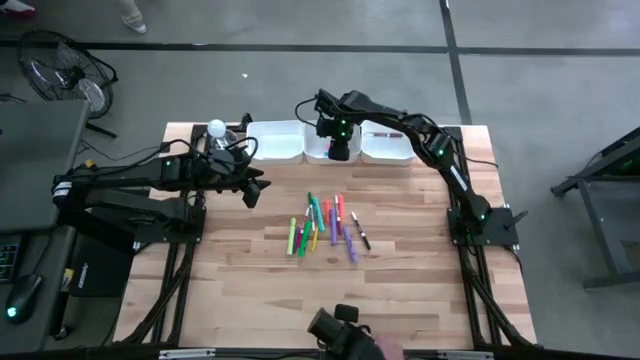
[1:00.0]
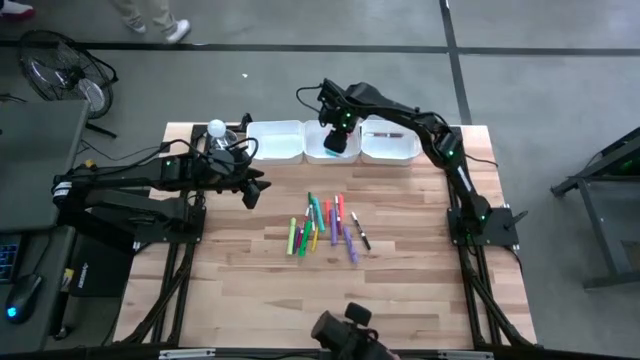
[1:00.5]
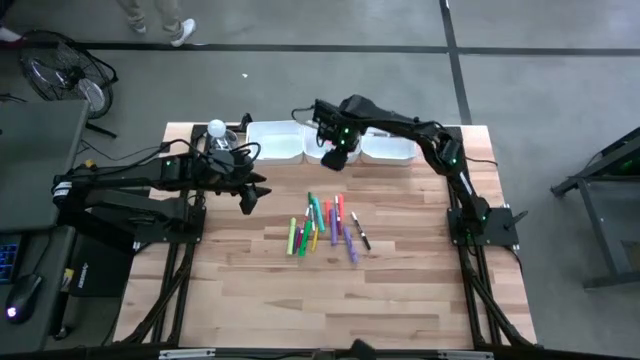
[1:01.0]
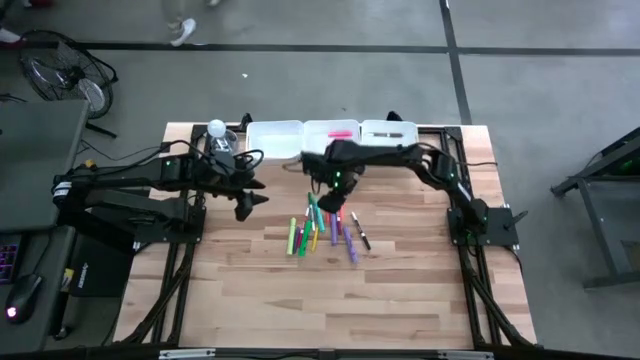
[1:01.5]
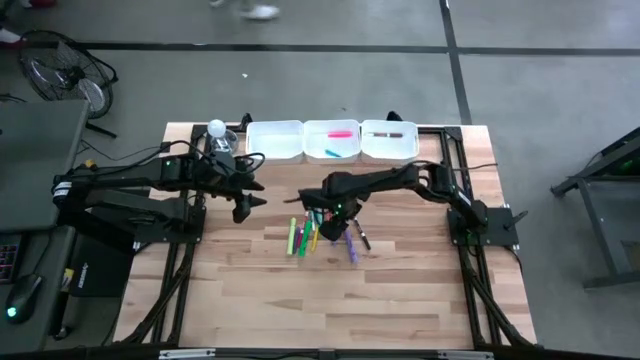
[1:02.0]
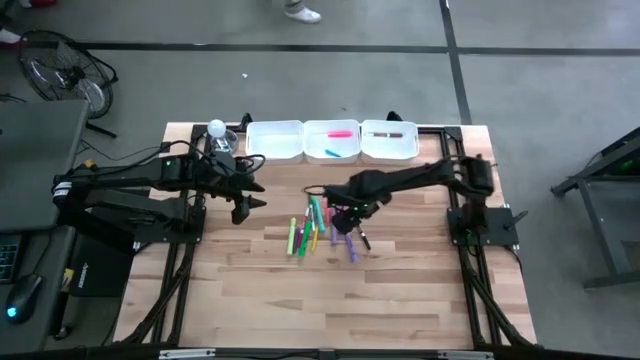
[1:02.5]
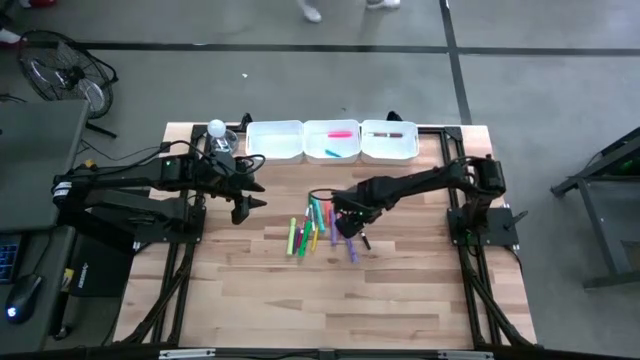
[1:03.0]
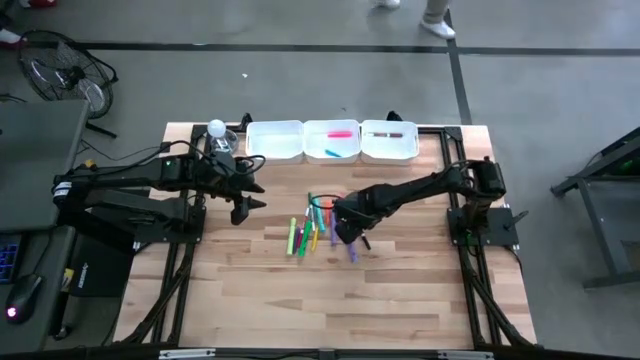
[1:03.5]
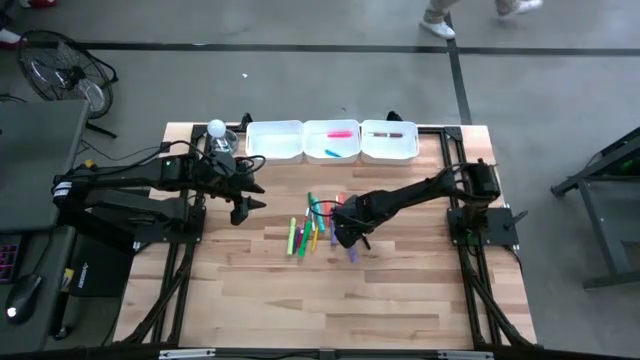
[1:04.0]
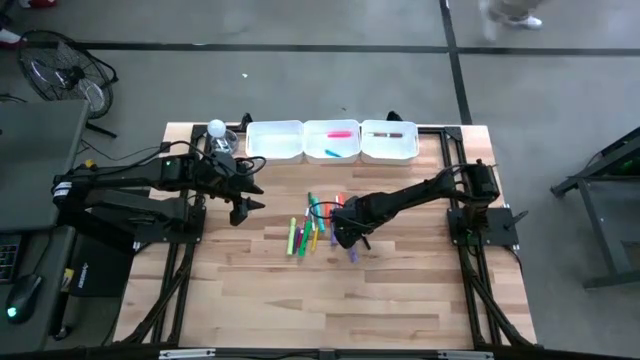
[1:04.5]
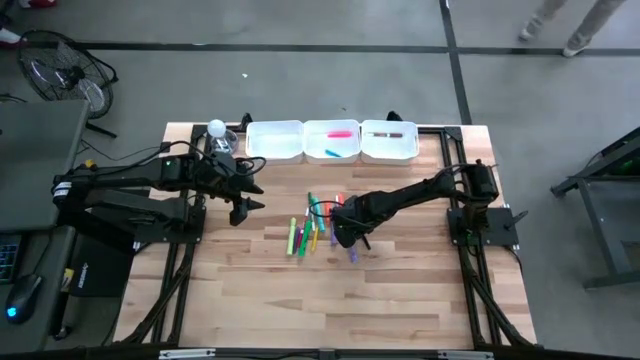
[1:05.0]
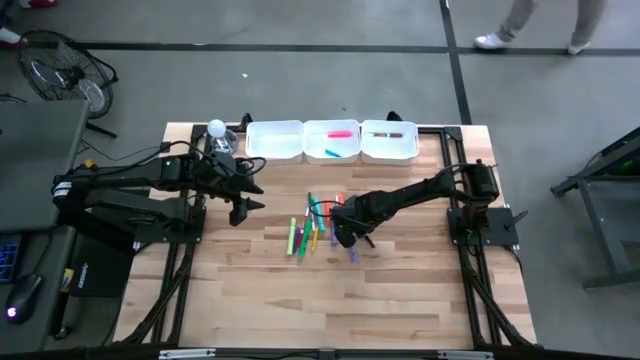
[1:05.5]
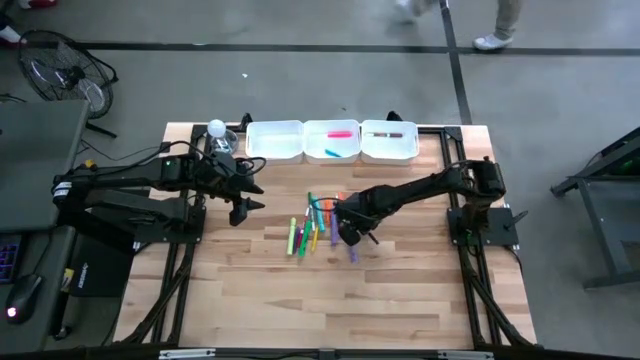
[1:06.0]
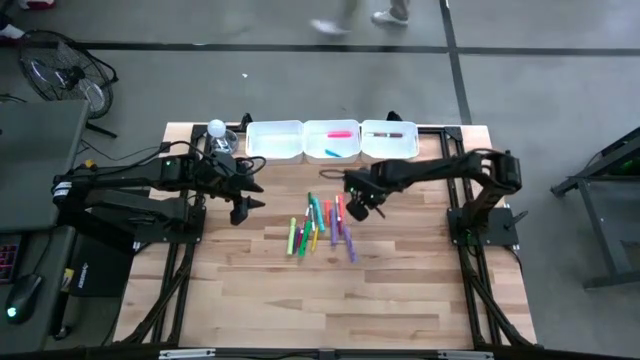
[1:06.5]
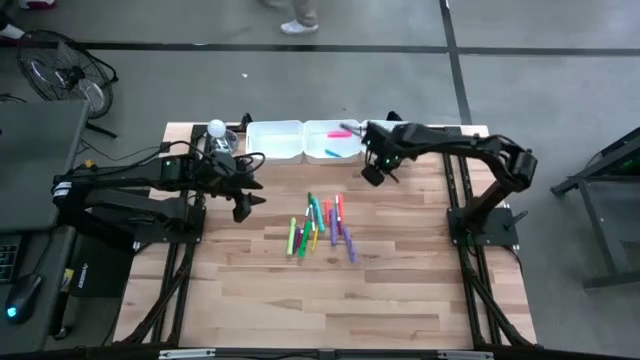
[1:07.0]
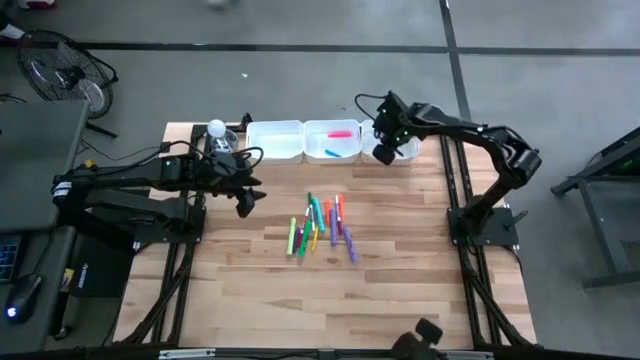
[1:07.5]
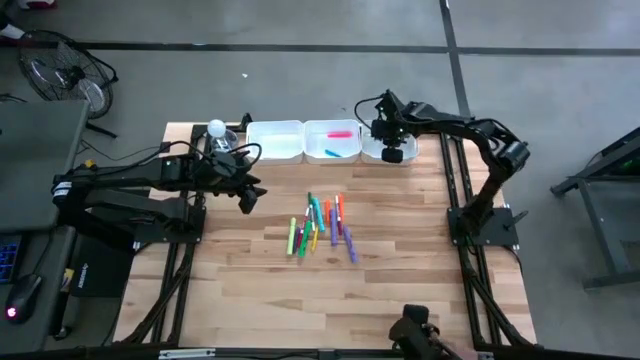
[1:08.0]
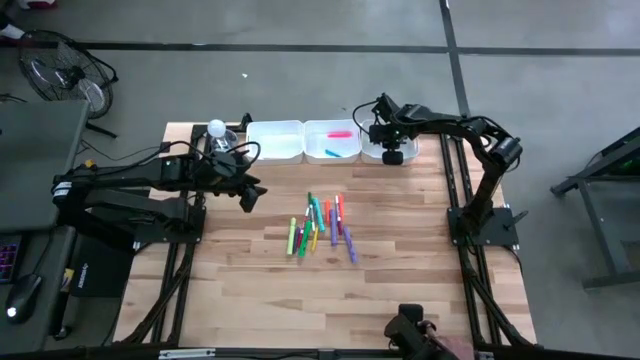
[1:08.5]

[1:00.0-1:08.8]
Task: Pick & Place Markers
Put the black marker pen into the right white bin

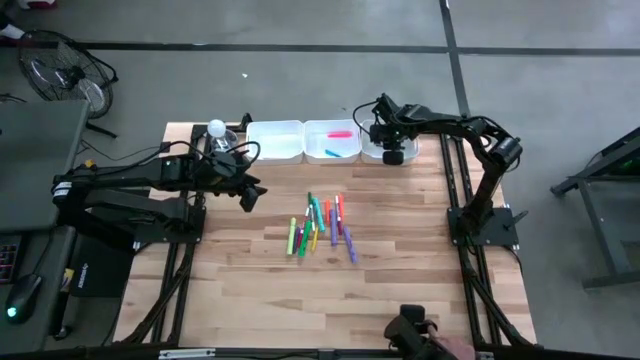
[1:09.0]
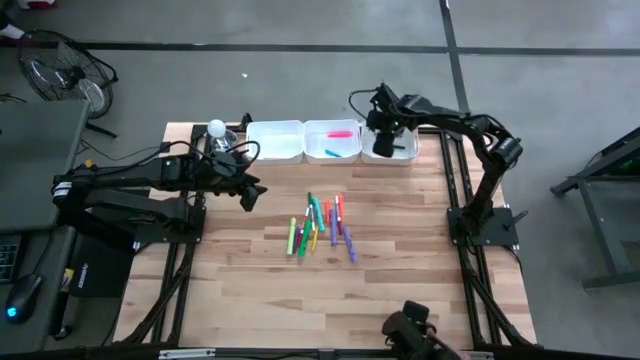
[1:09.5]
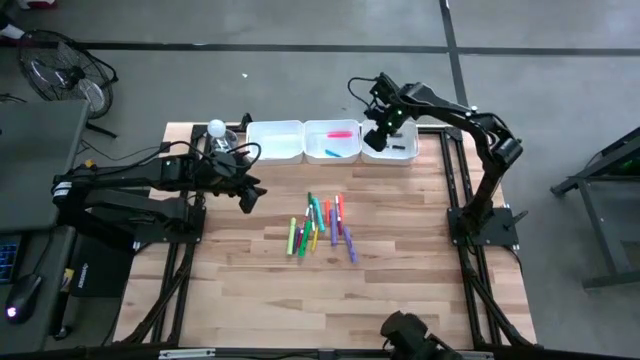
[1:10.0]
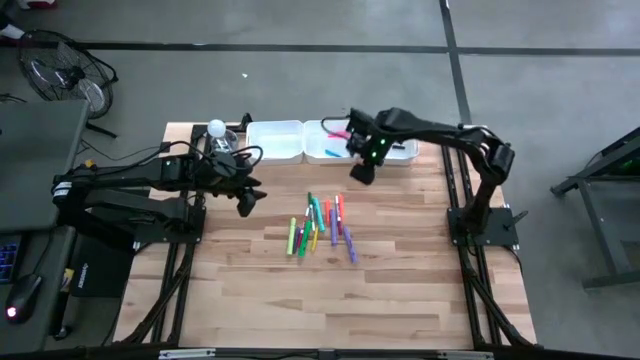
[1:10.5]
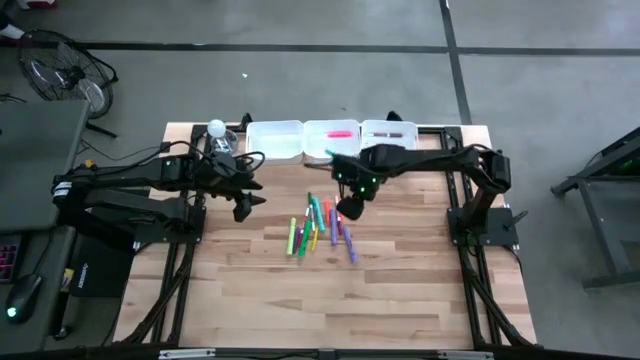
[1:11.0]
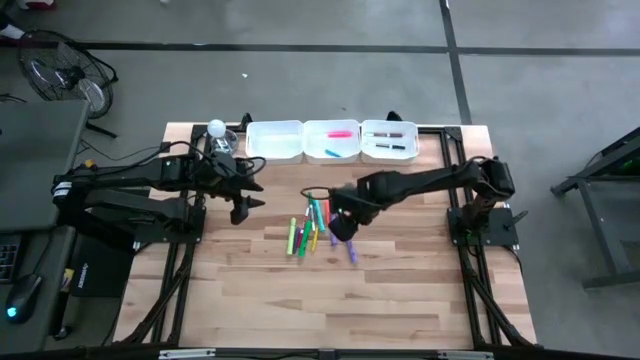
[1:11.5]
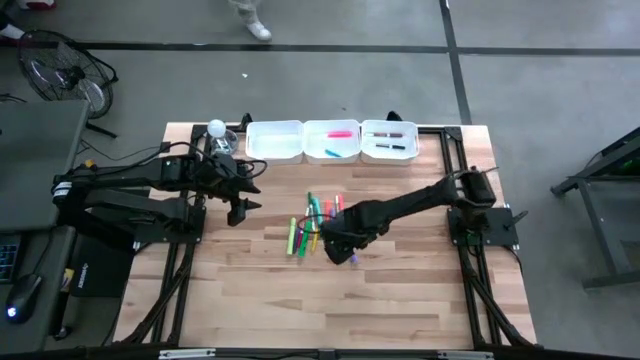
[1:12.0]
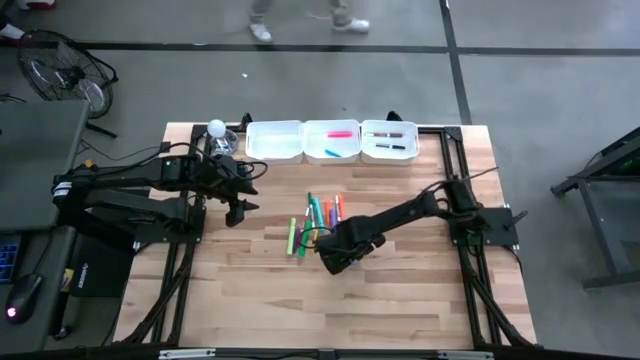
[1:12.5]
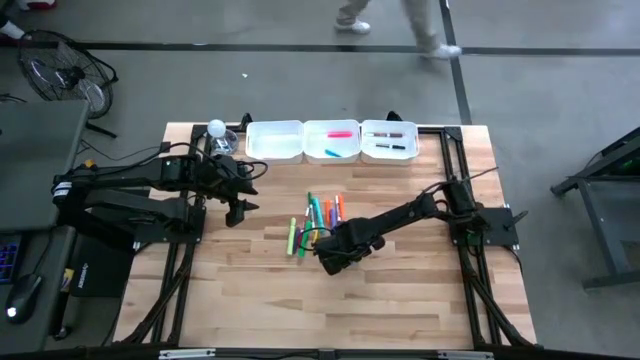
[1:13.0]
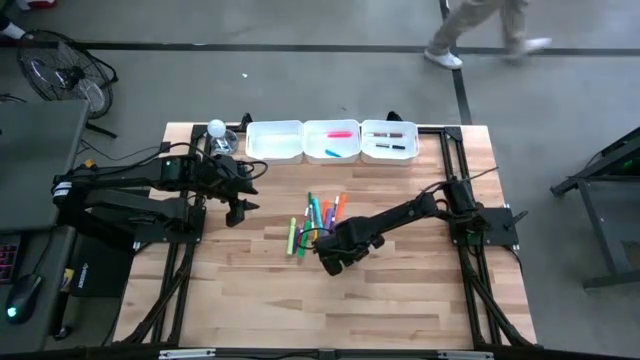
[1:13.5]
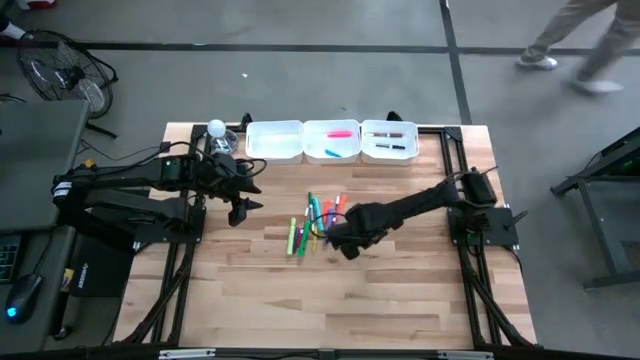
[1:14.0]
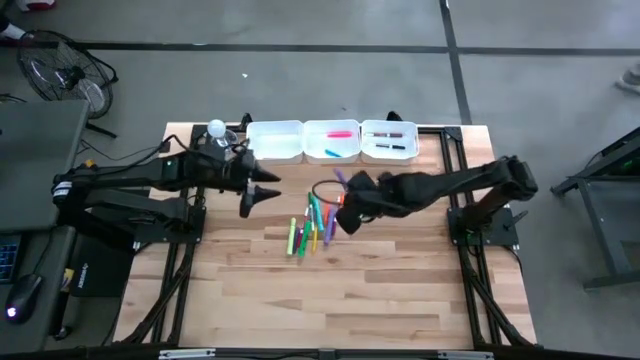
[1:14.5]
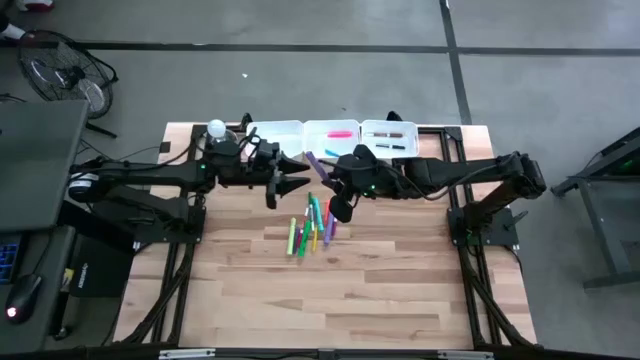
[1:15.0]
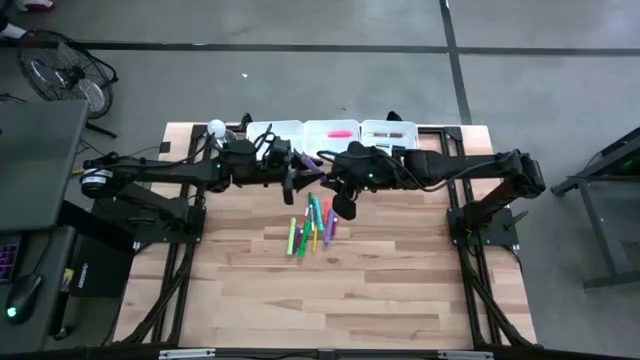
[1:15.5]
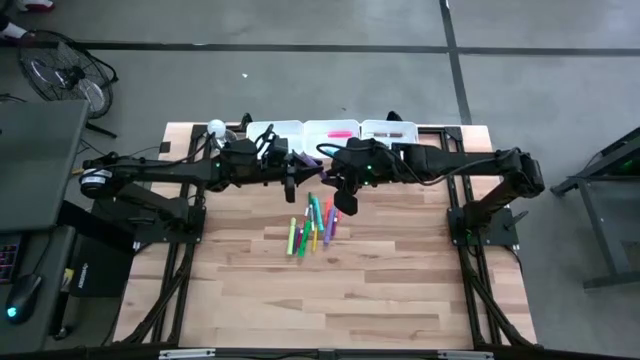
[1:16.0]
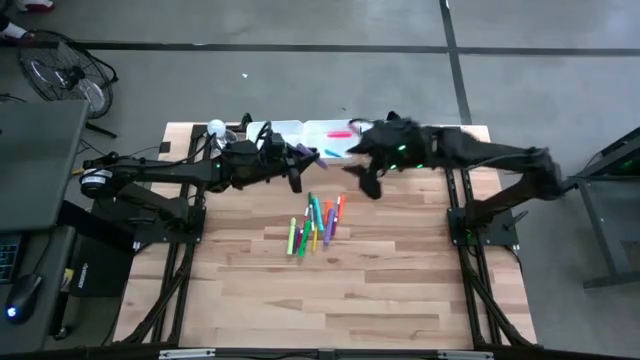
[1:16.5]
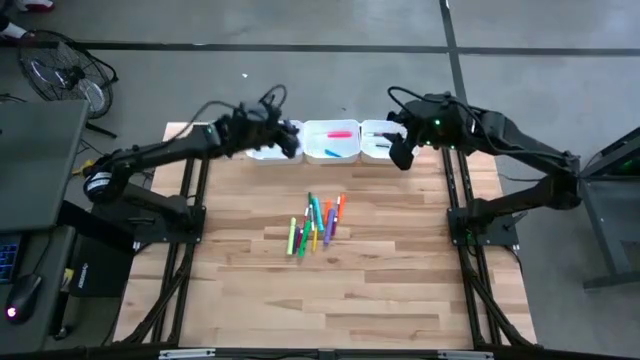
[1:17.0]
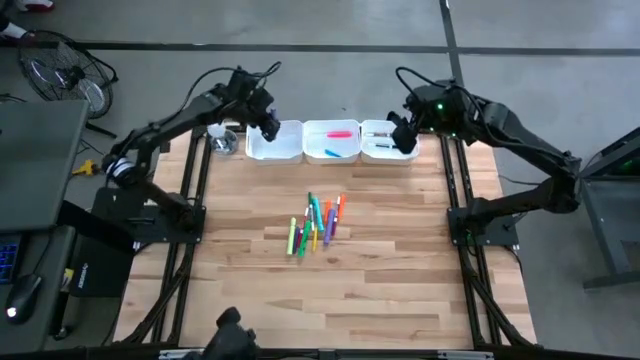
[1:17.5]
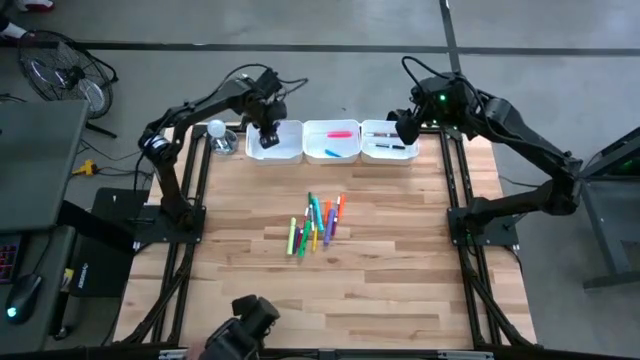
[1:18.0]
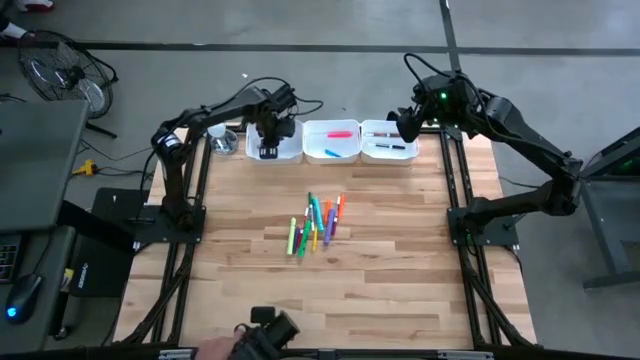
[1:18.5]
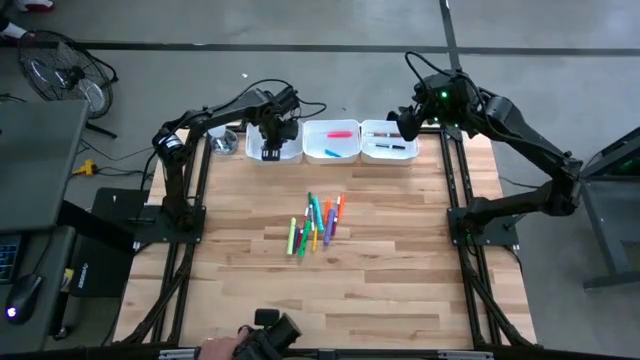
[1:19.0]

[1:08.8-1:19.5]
Put the bottom violet highlighter pen into the left white bin

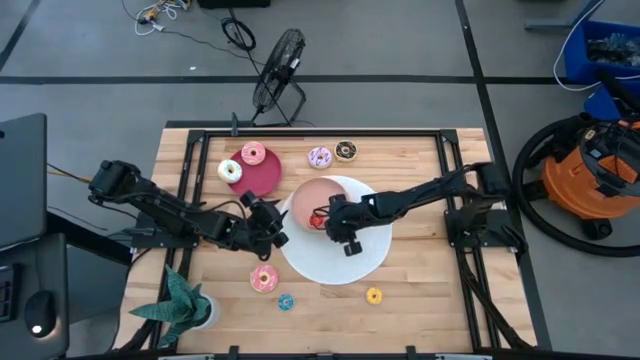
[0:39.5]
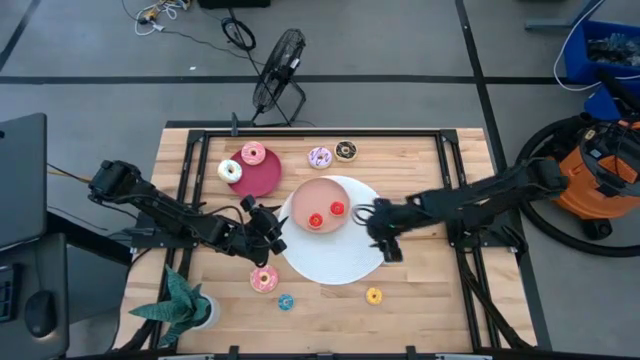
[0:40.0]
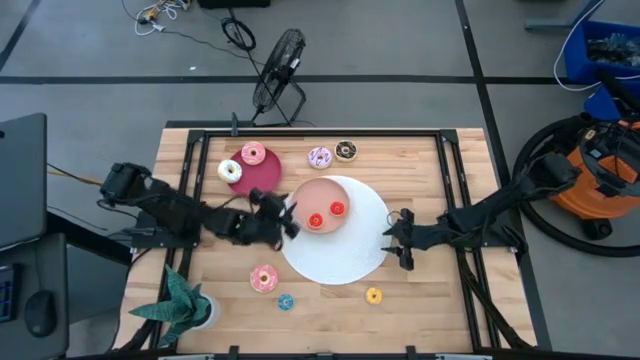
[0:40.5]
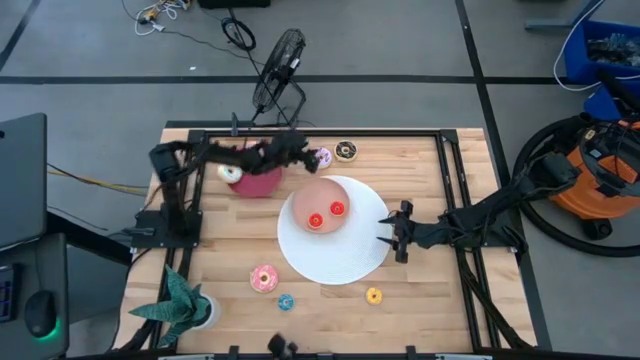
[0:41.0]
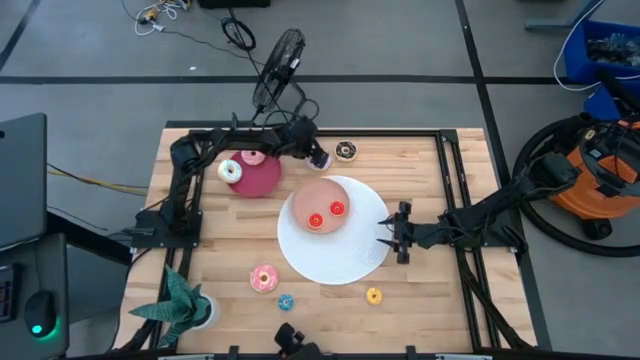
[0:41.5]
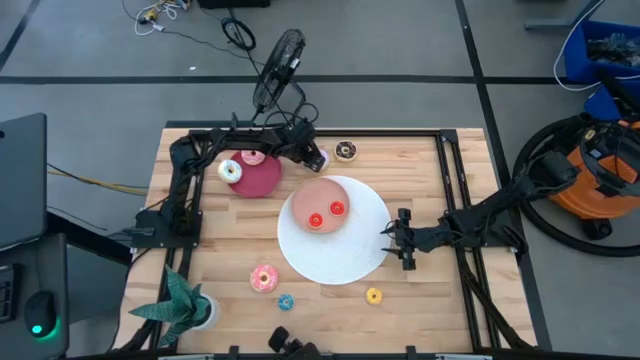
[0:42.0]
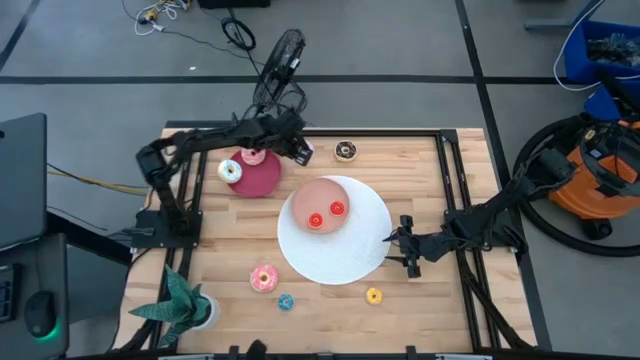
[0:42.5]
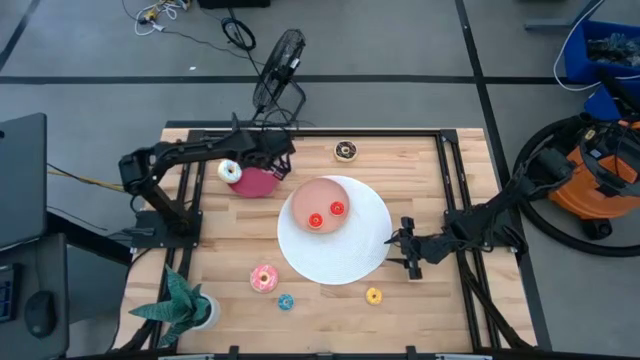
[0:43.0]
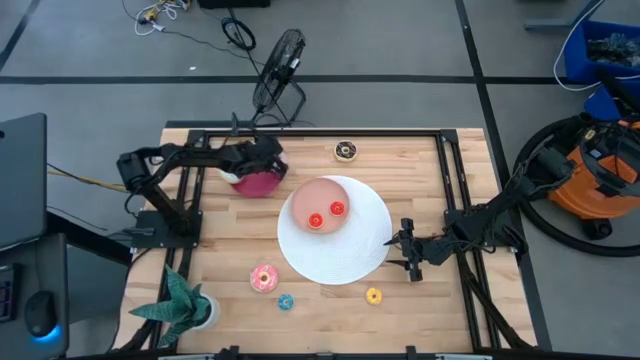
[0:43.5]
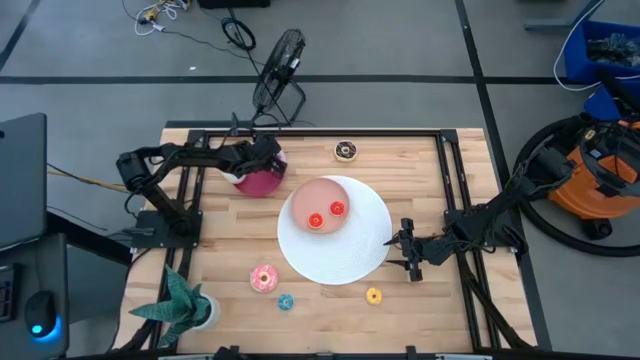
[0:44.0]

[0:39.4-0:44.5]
Task: Pick & Place donuts
Put the big purple donut on the dark pink plate
